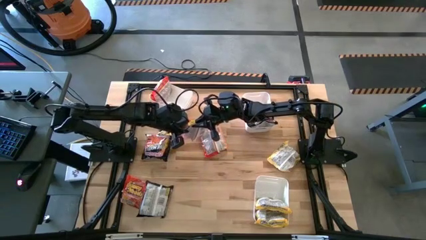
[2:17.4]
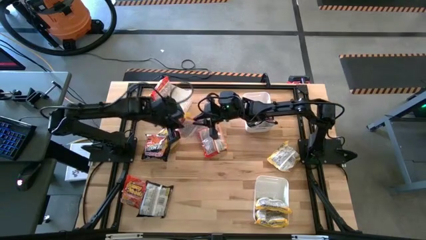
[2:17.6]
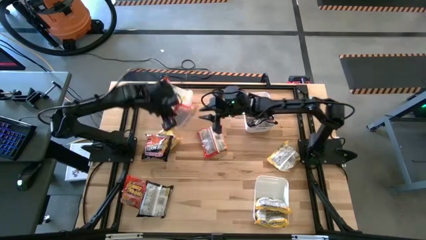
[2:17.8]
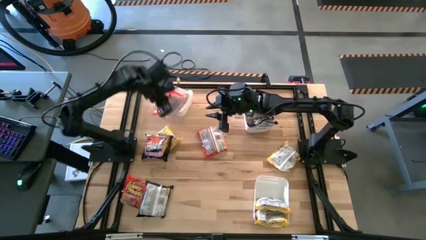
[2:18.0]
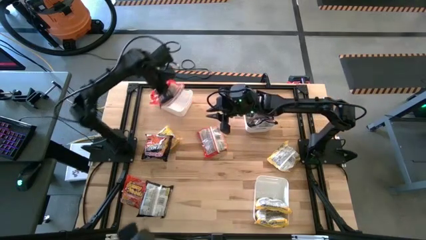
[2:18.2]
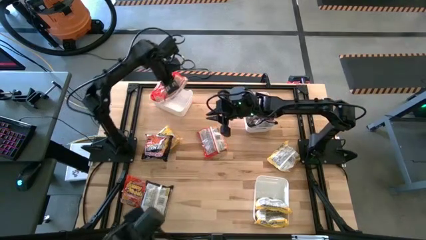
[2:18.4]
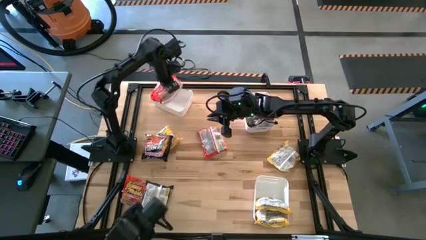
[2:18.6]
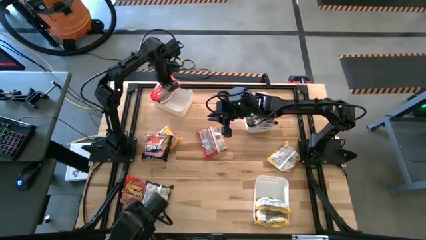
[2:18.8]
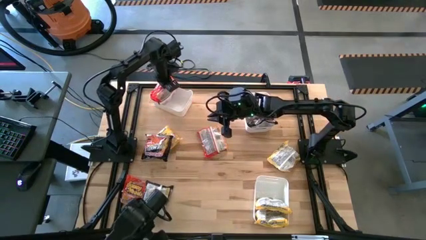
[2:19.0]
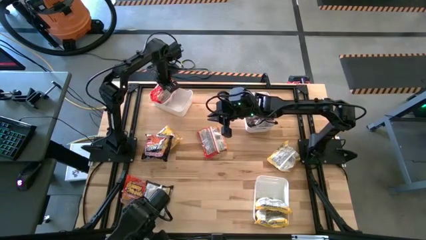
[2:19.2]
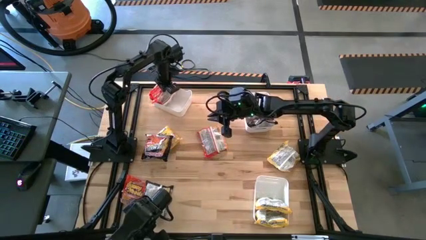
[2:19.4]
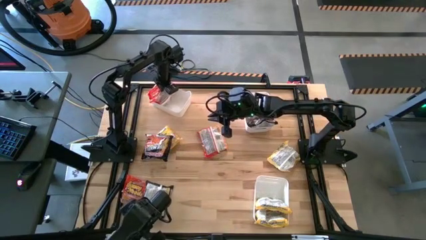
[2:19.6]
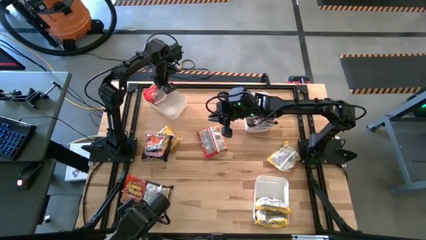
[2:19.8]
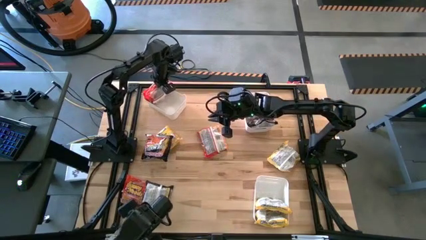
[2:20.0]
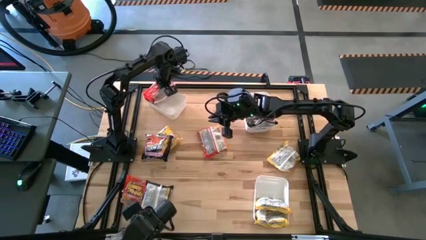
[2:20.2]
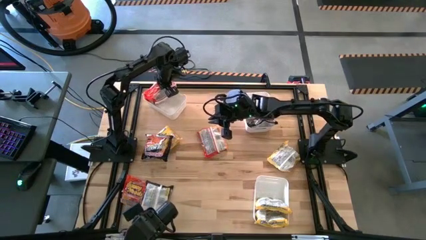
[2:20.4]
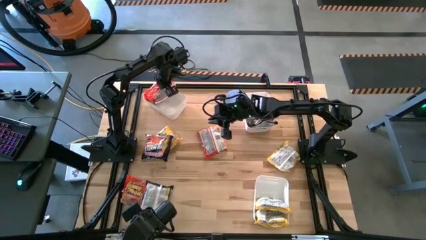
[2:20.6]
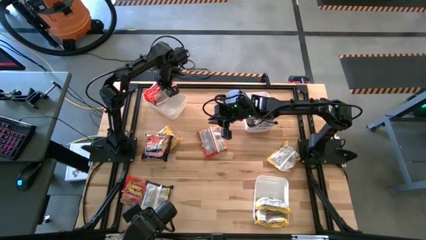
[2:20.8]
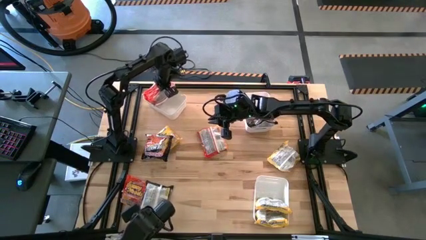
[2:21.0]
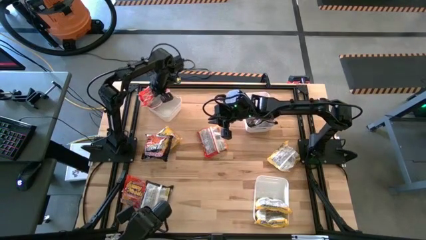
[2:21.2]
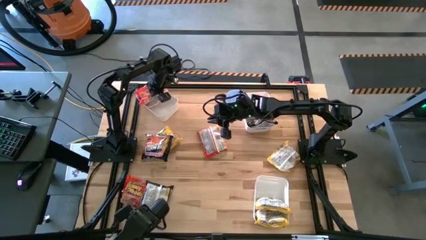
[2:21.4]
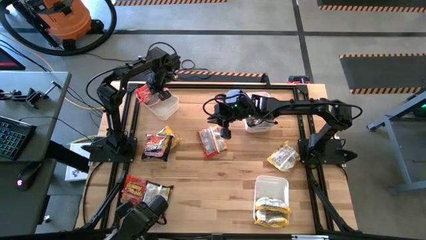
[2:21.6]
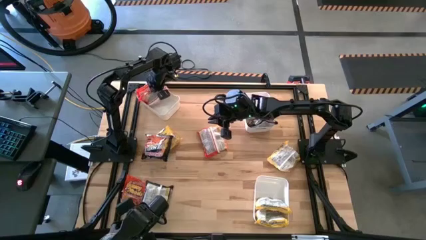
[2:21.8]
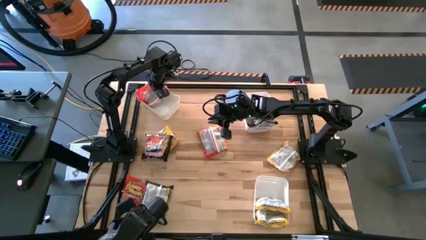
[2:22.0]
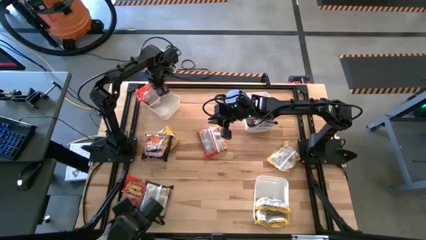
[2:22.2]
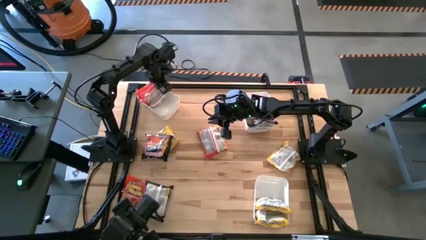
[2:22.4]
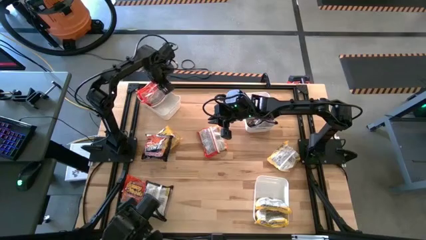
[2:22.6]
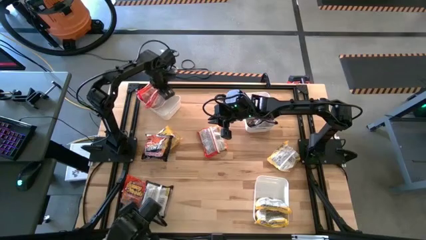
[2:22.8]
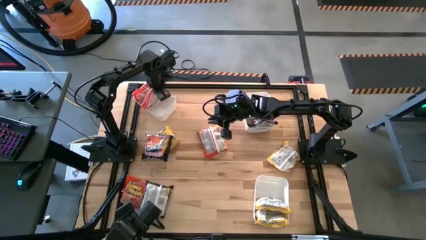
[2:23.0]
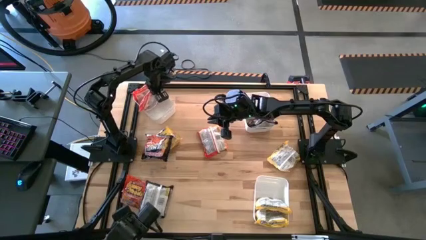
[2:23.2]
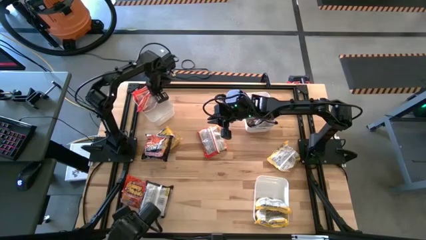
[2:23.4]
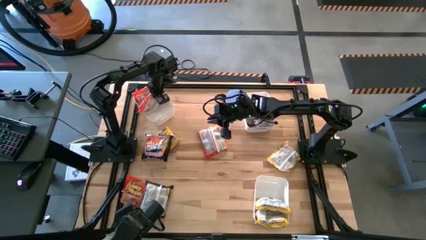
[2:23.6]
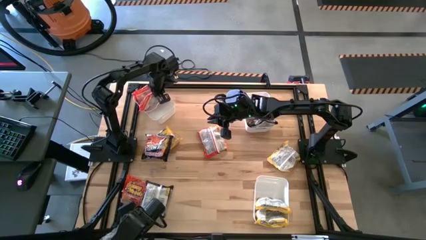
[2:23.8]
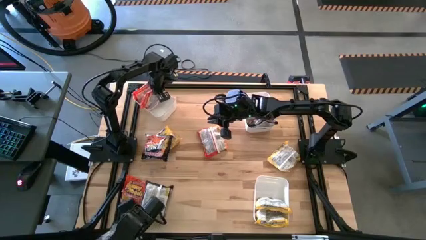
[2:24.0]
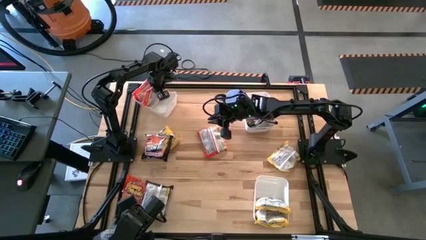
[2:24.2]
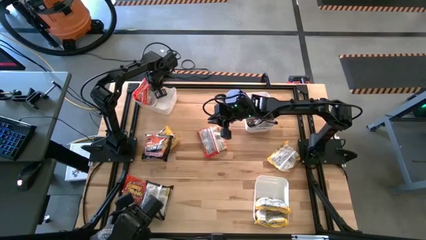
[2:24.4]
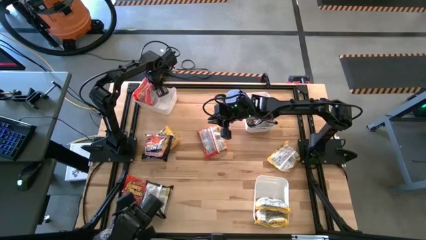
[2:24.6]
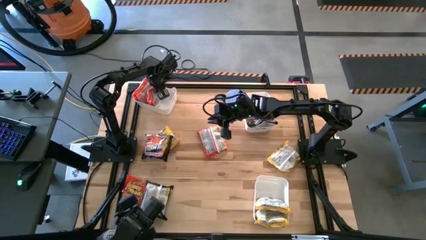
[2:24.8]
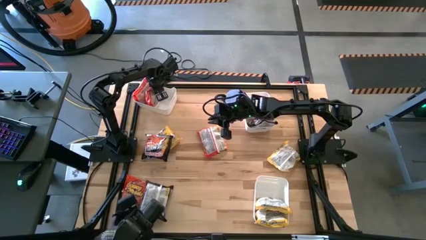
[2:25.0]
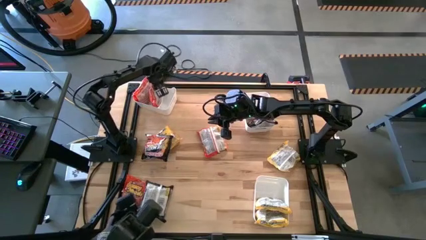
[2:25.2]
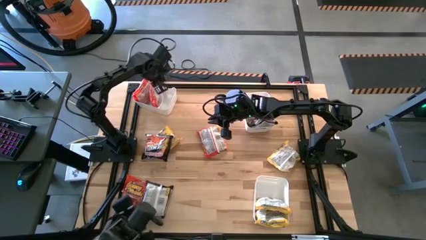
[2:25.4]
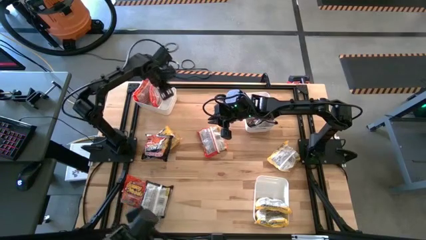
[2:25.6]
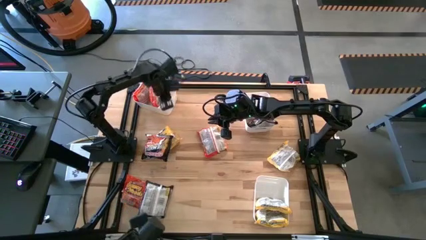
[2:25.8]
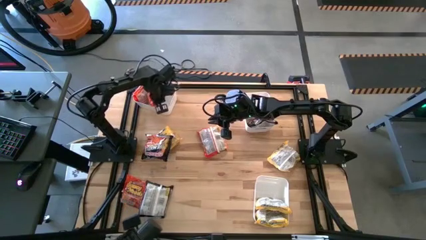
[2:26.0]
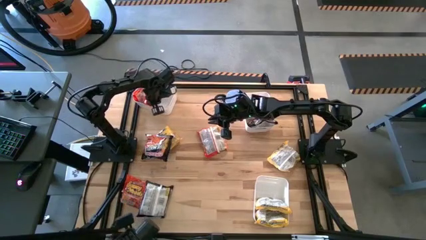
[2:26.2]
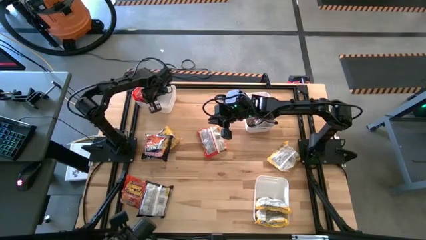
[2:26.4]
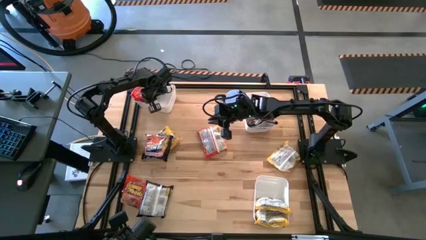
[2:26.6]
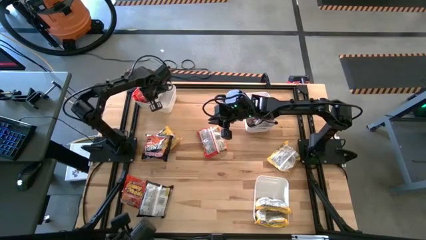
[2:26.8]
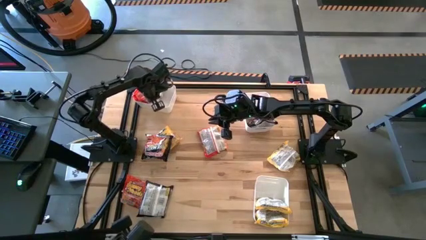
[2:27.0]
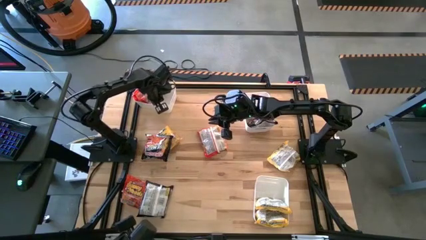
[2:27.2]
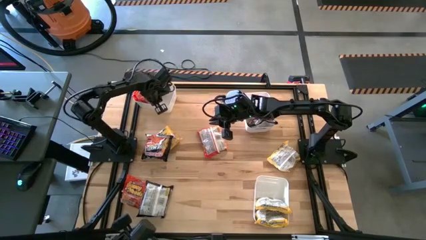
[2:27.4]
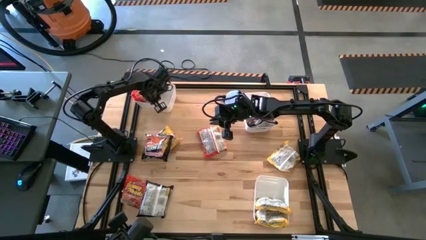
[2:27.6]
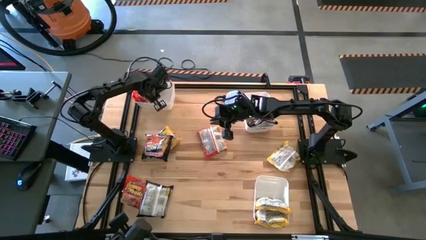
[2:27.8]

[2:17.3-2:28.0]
Task: Sort Maruchan noodles
Put the orange noodle pack into the top left white bin

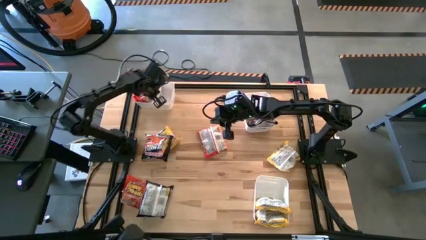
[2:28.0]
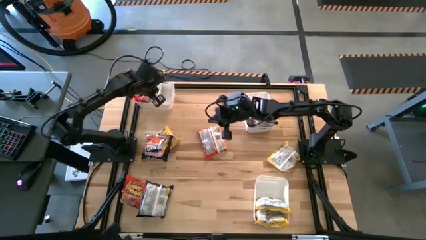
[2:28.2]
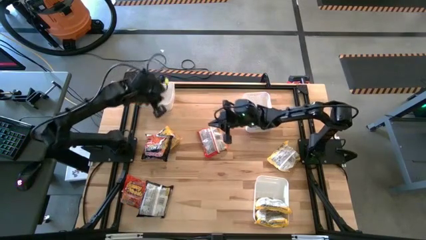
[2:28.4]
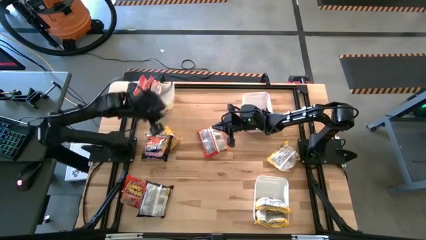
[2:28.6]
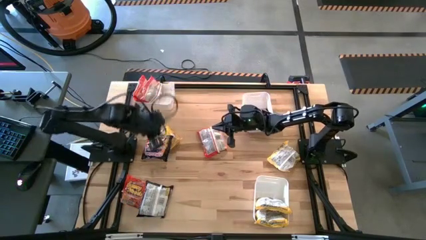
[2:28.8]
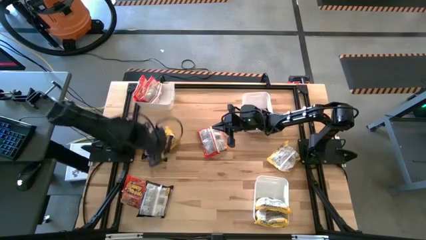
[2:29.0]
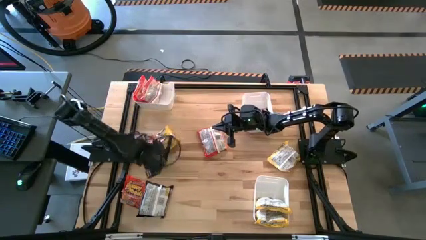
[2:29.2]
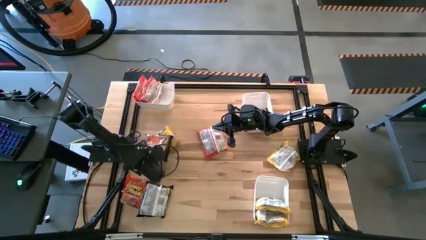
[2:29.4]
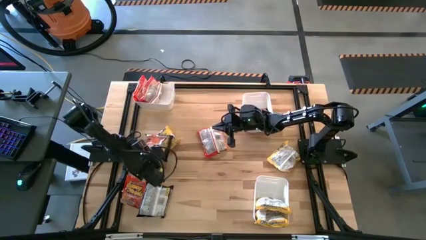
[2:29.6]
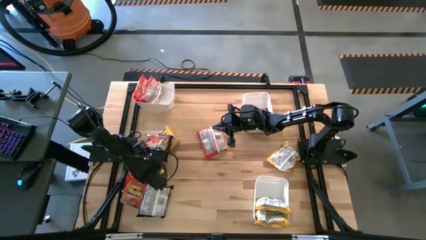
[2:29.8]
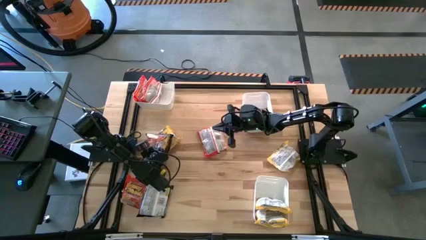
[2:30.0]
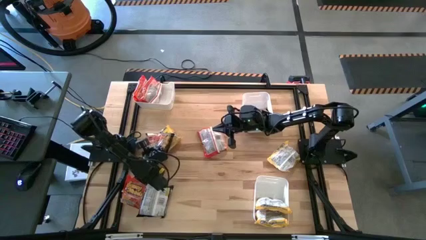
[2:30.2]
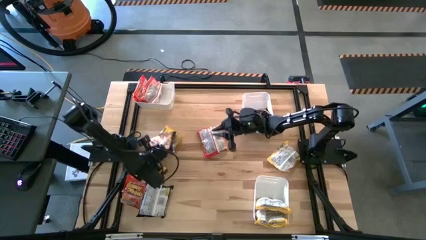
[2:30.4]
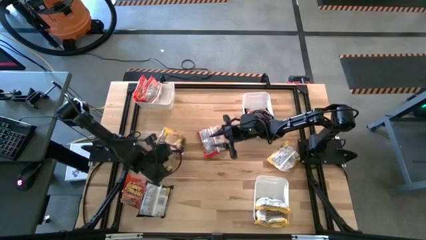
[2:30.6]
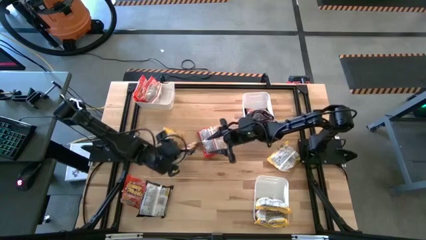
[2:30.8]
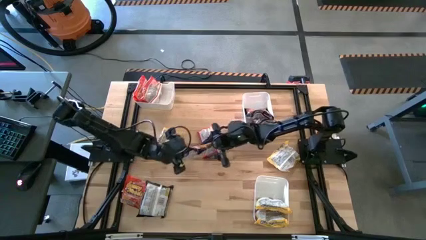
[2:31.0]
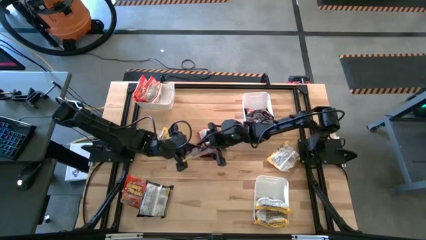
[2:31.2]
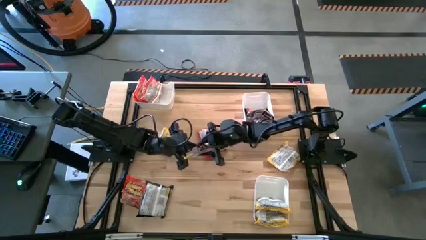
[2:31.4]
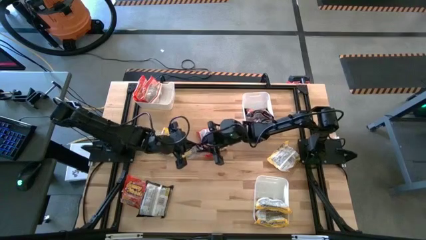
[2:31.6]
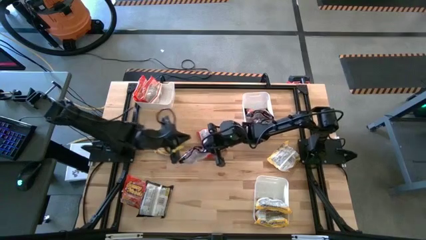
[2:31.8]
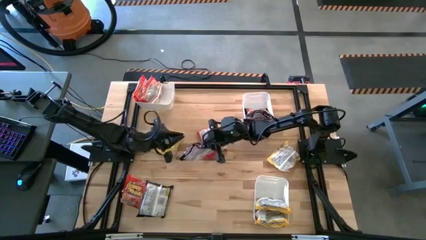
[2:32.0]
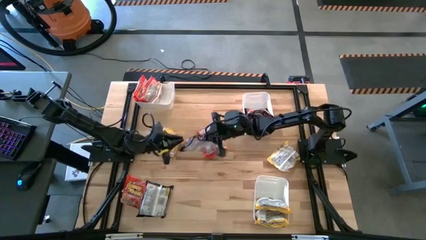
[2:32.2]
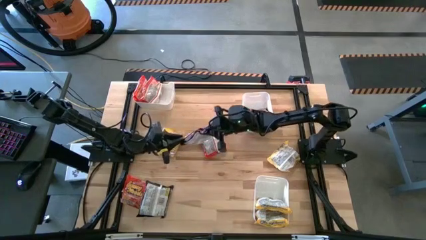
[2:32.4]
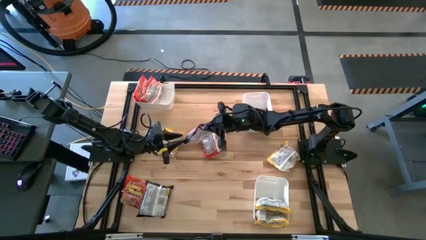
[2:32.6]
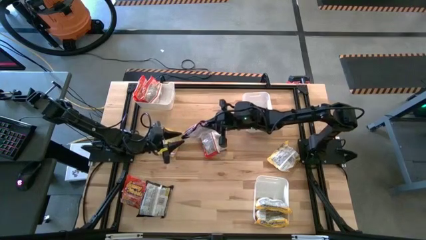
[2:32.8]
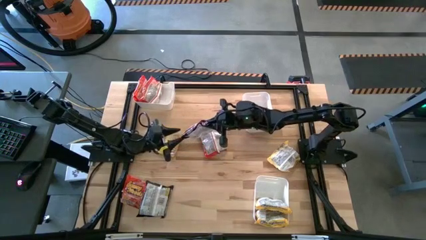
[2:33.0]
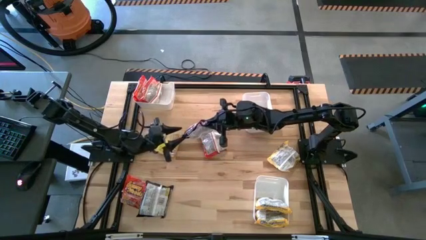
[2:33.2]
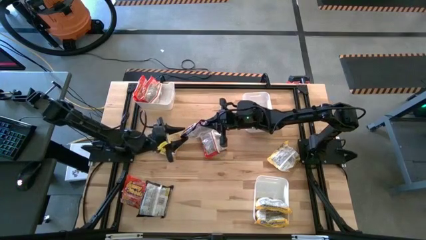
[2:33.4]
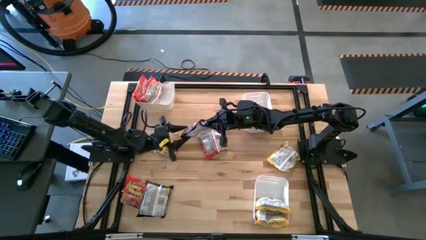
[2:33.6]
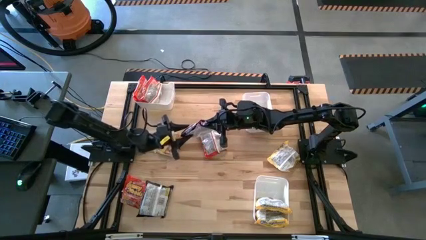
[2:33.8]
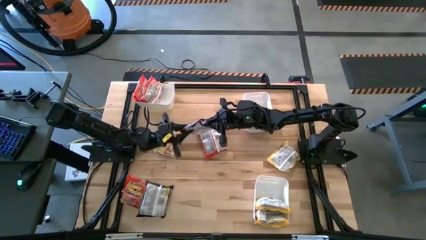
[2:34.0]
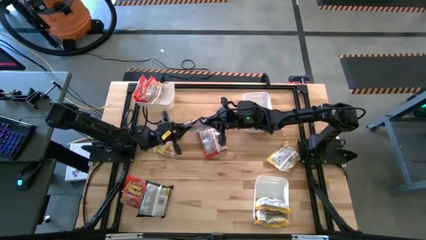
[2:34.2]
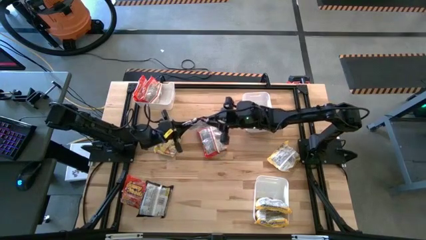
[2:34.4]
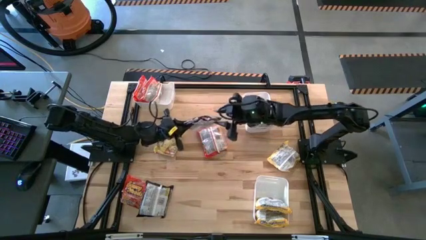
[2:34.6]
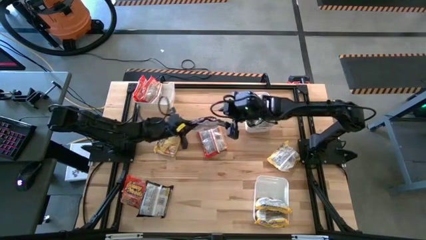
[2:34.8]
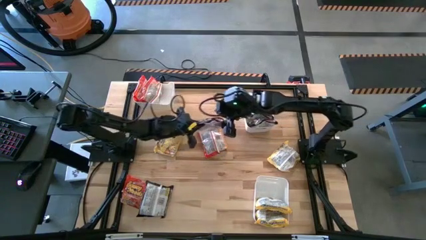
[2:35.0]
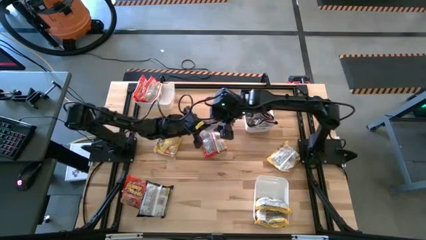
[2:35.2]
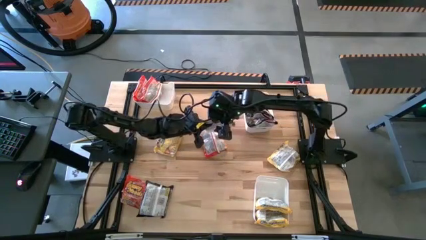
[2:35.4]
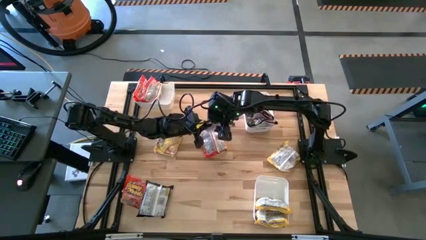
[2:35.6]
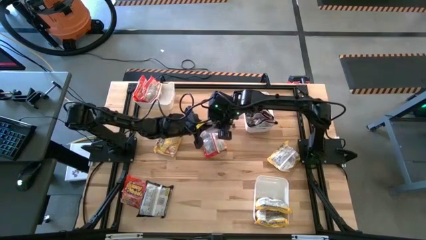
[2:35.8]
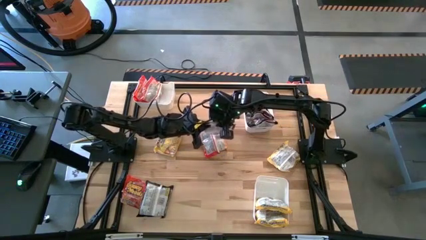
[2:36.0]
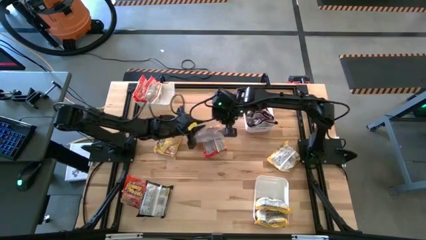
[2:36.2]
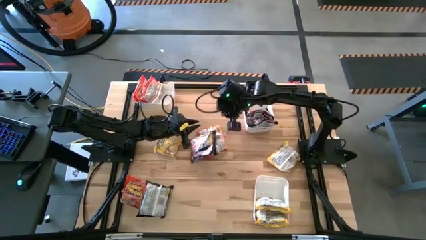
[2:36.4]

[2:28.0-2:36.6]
Put the black noodle pack into the top right white bin
